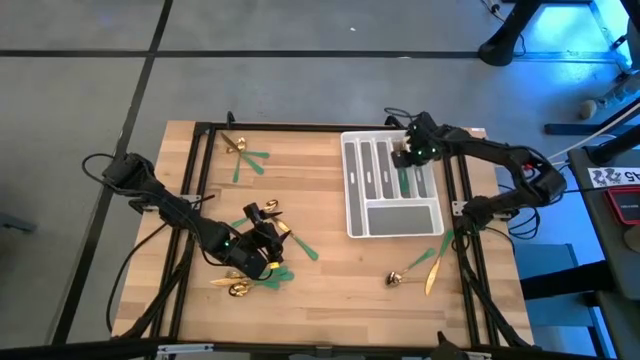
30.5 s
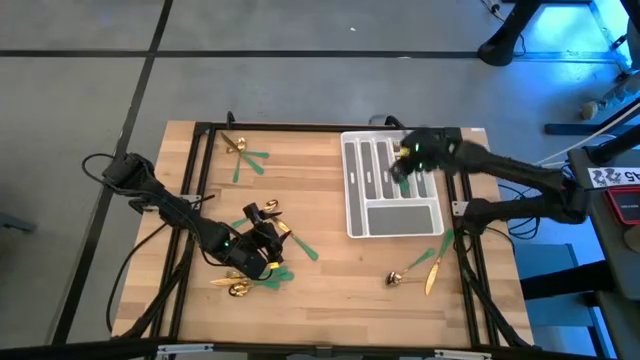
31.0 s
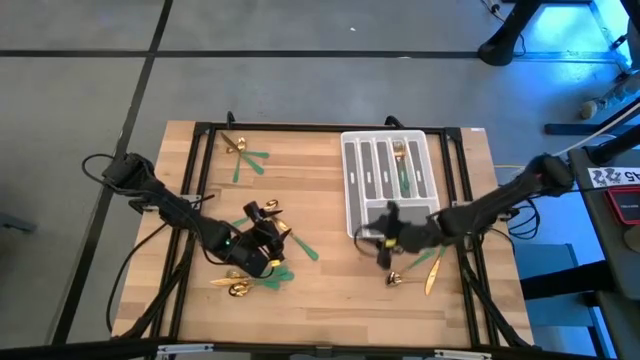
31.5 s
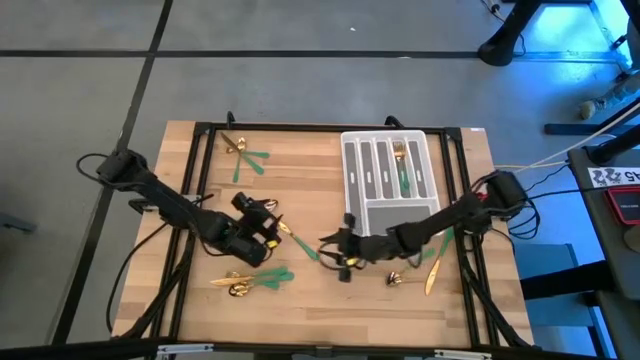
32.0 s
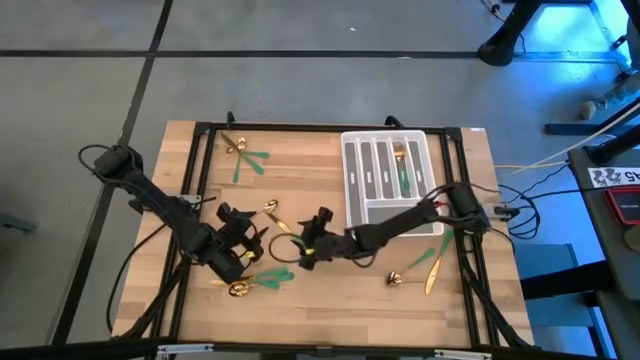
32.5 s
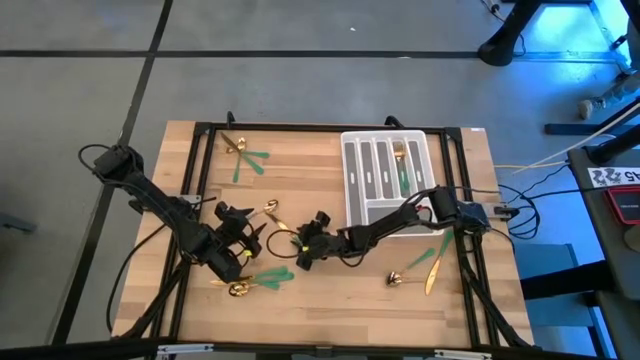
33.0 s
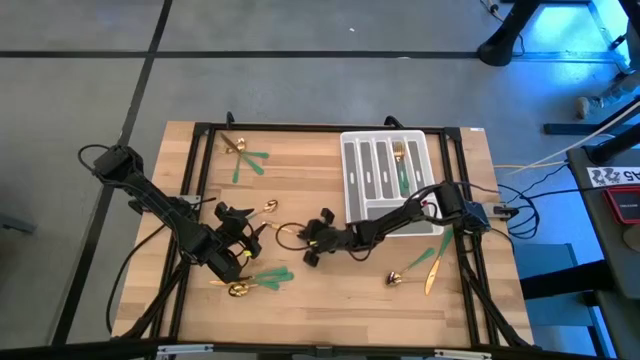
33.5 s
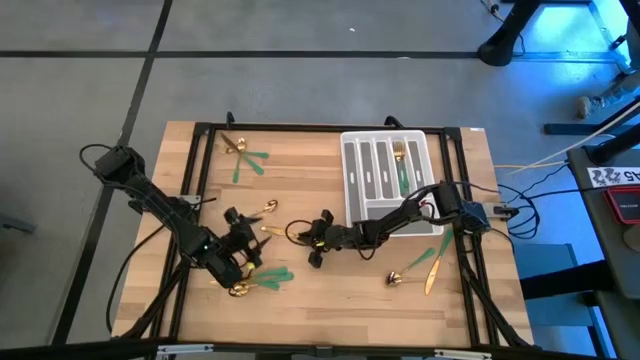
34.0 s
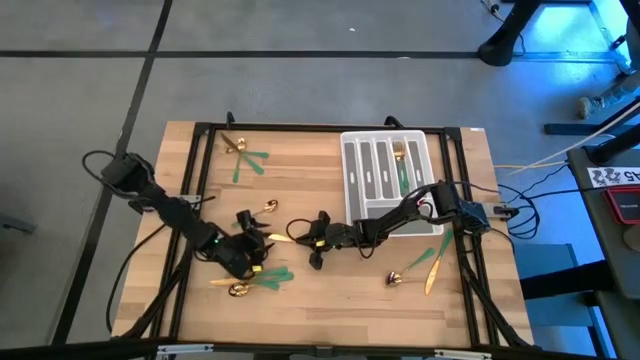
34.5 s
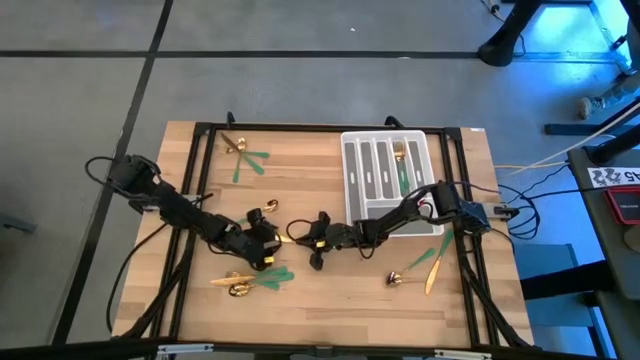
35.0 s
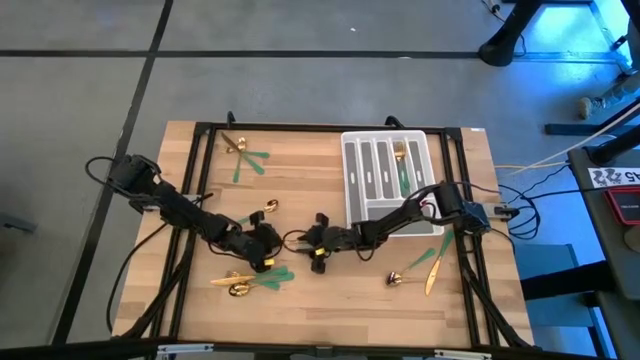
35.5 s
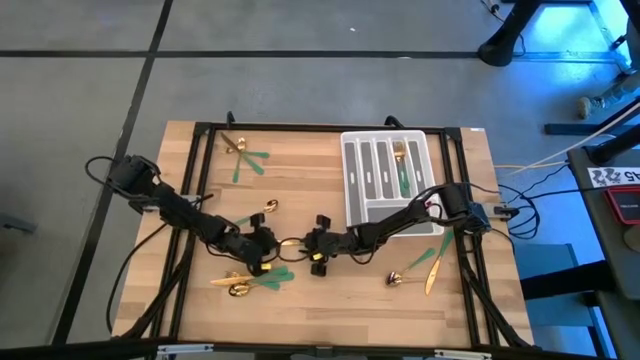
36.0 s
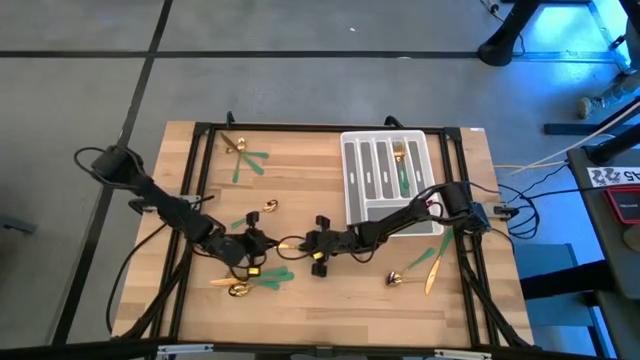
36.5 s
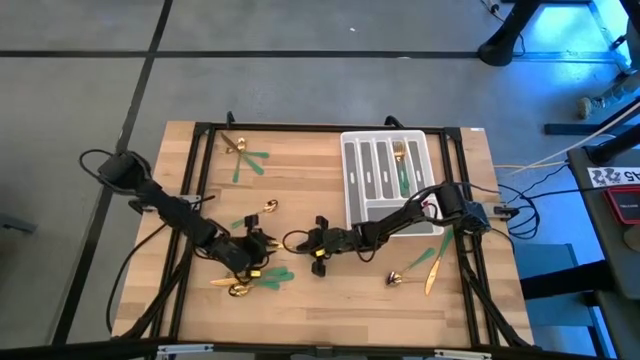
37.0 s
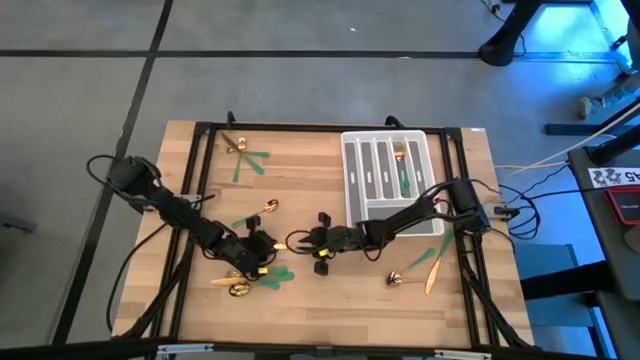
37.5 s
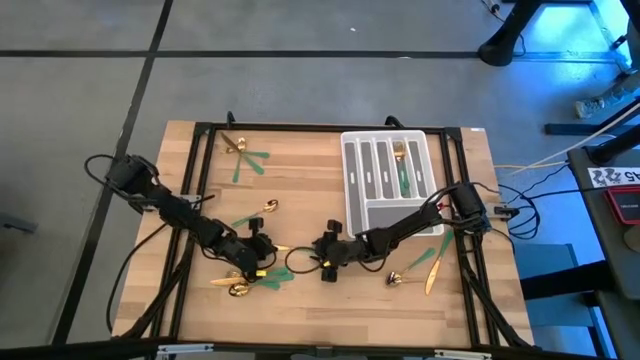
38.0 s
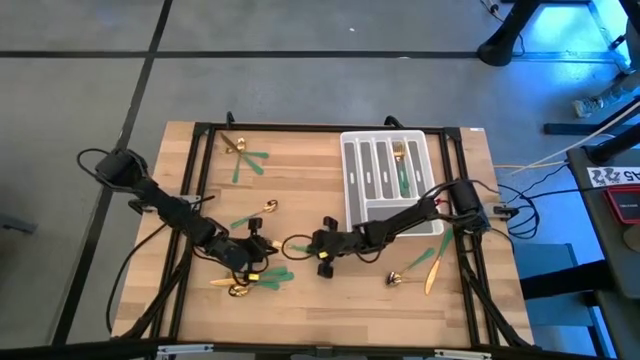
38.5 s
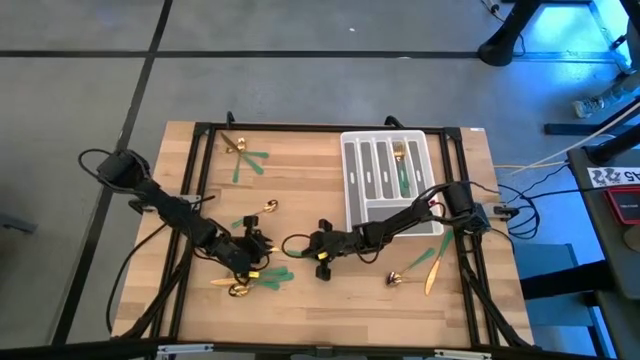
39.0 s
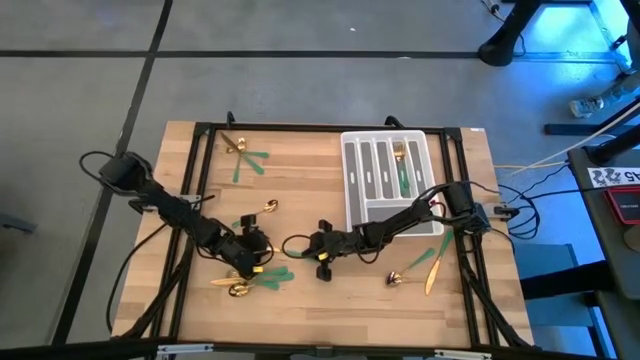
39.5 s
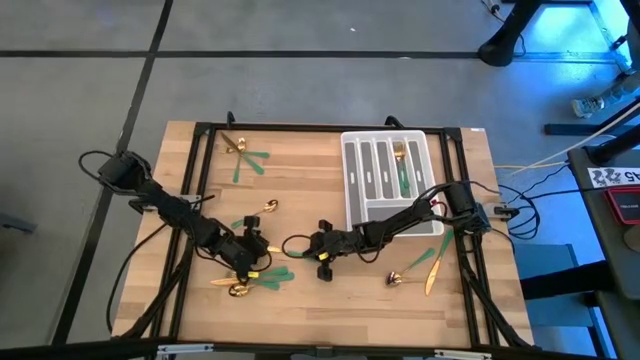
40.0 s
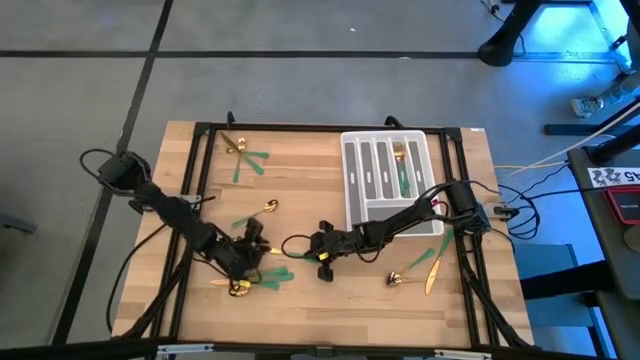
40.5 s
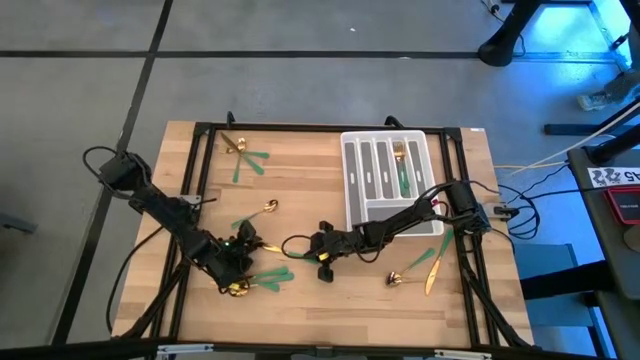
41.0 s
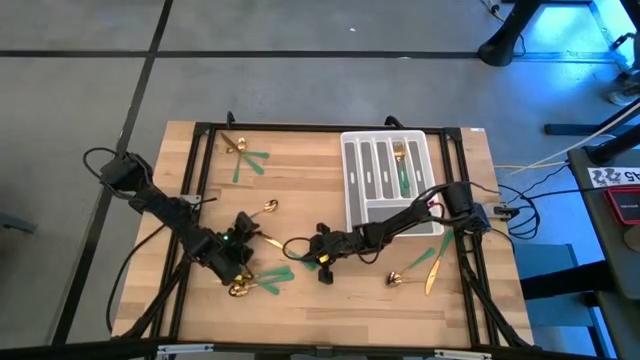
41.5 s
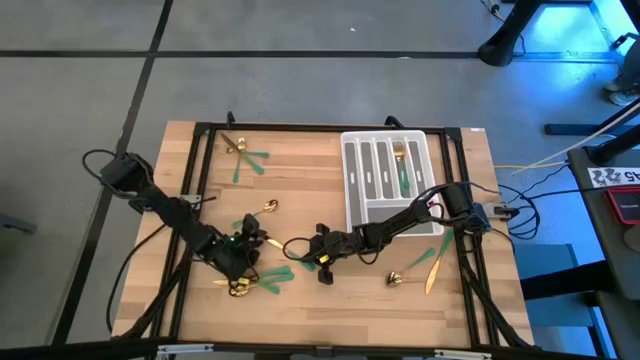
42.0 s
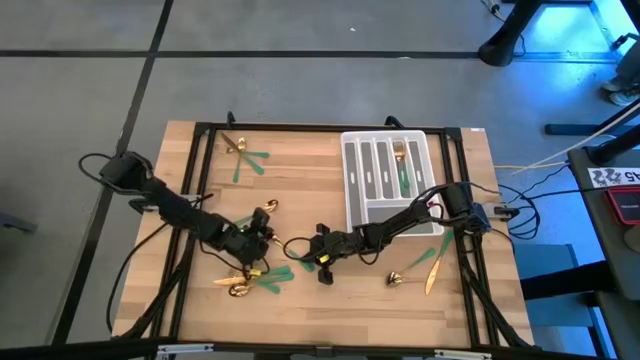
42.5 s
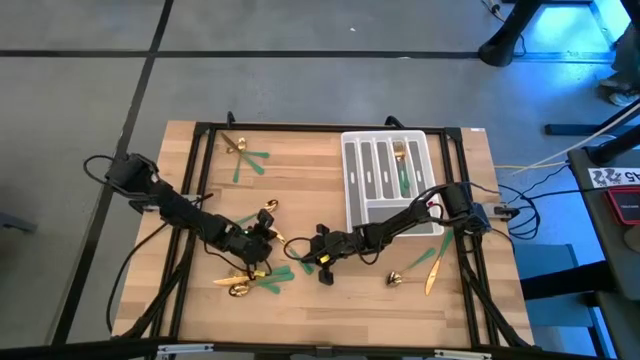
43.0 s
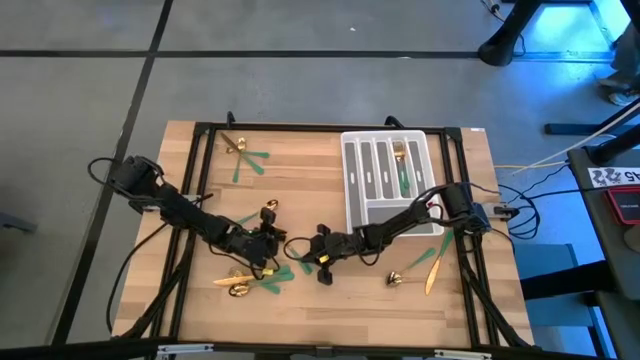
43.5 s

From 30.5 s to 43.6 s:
Task: Sort silverware
Put the green knife into the silverware tray

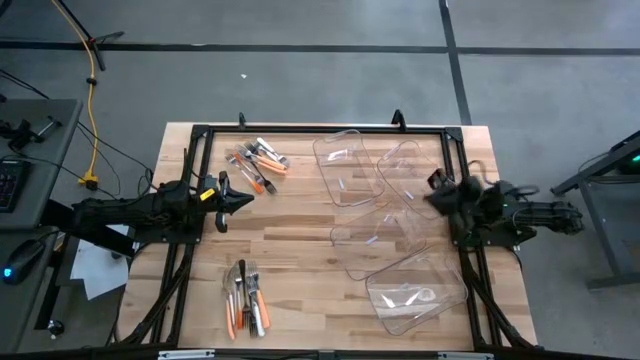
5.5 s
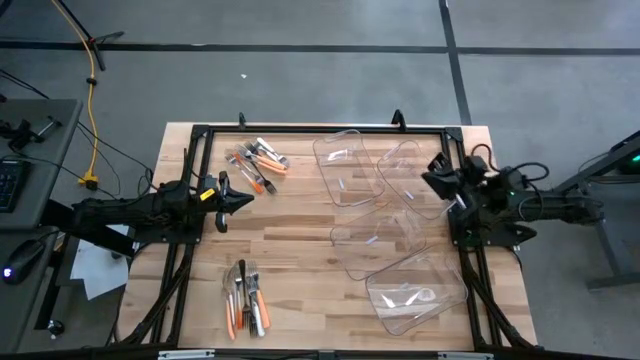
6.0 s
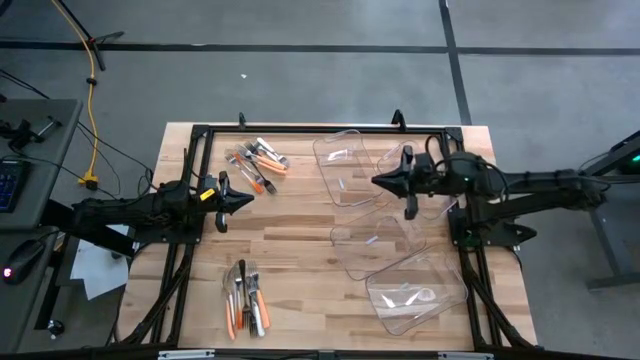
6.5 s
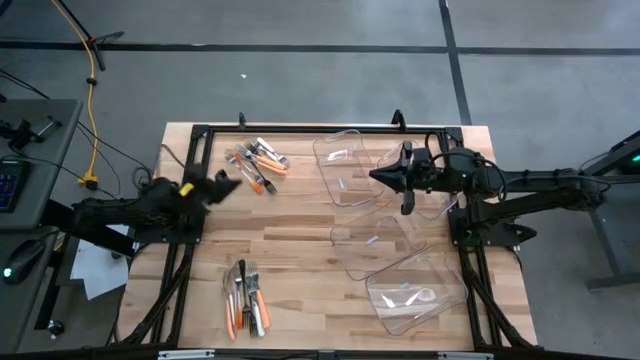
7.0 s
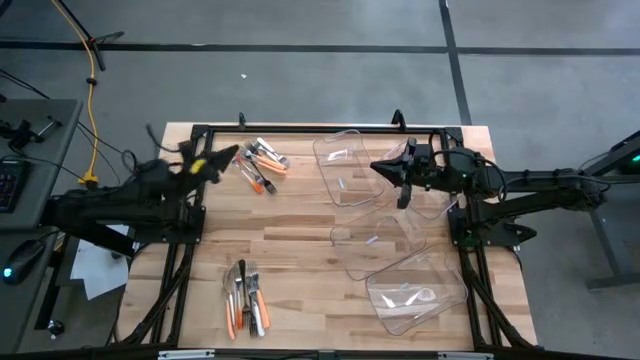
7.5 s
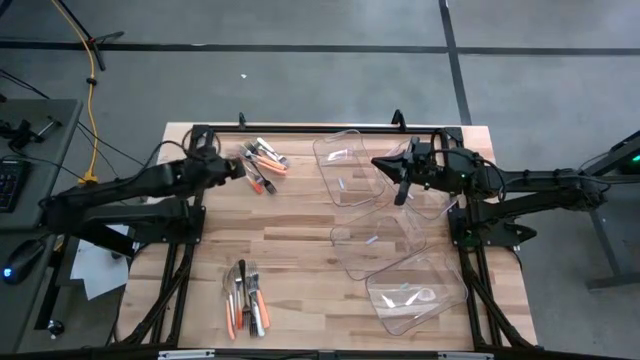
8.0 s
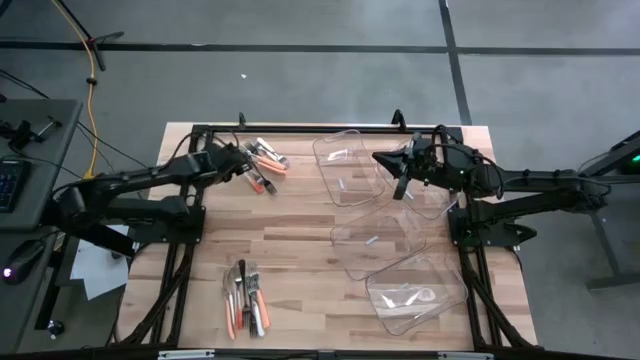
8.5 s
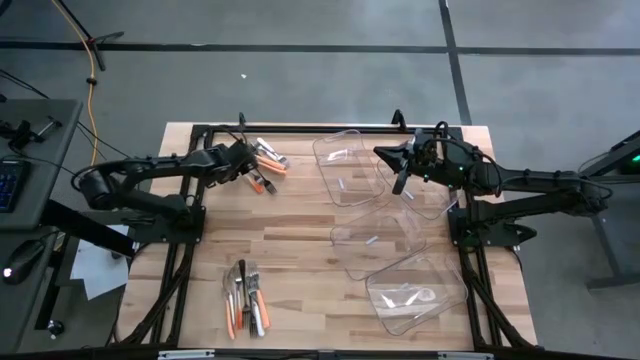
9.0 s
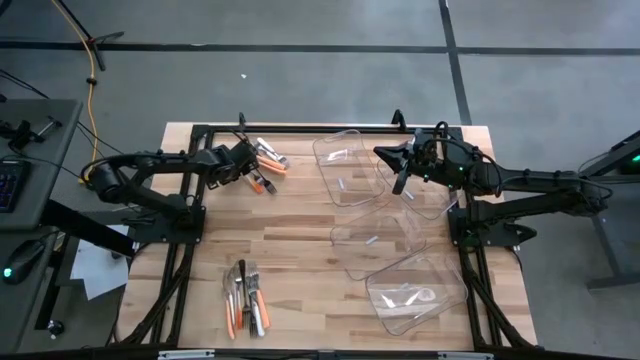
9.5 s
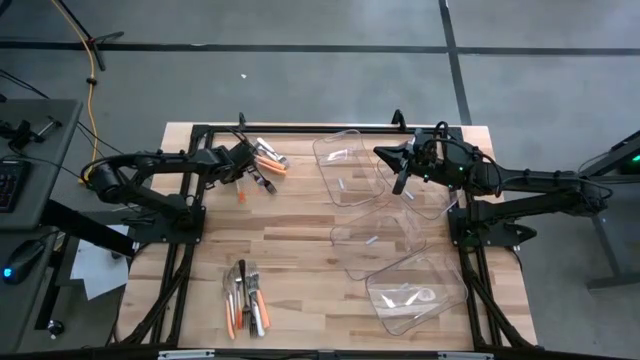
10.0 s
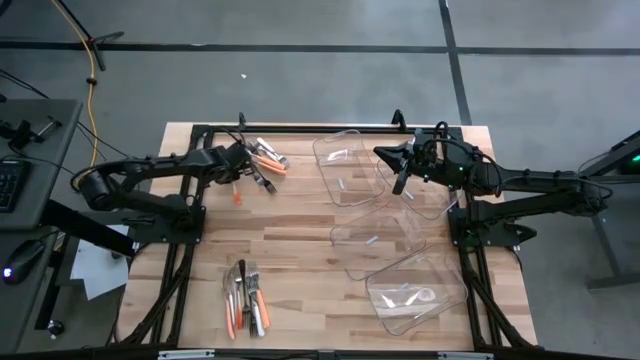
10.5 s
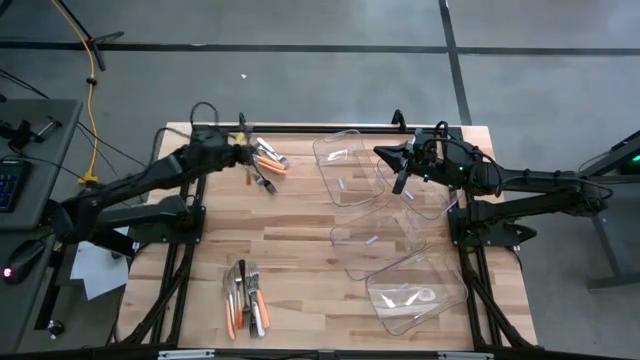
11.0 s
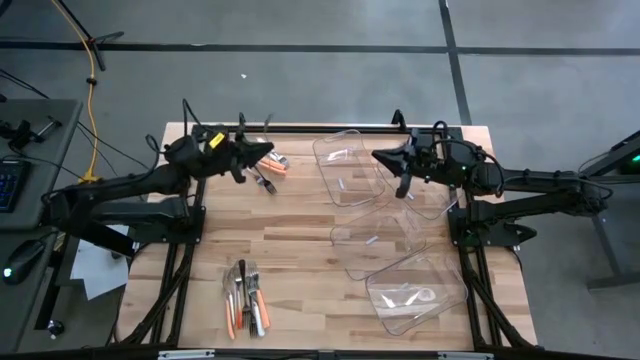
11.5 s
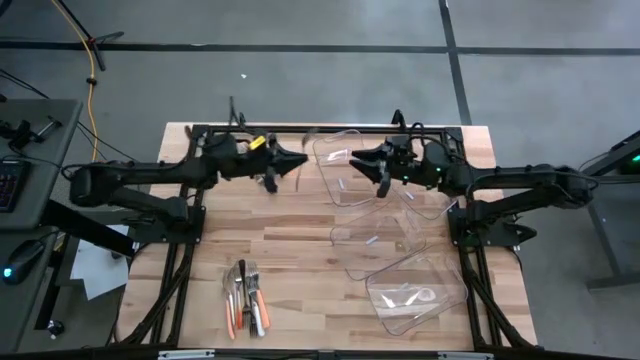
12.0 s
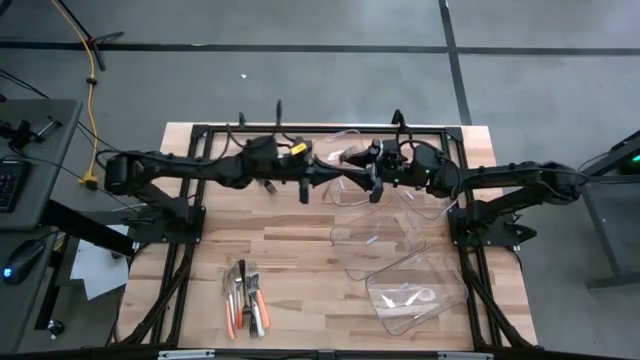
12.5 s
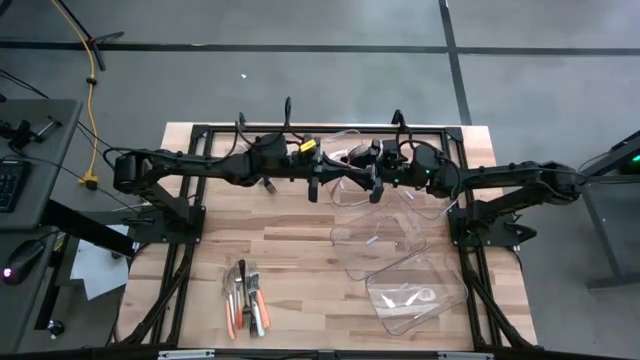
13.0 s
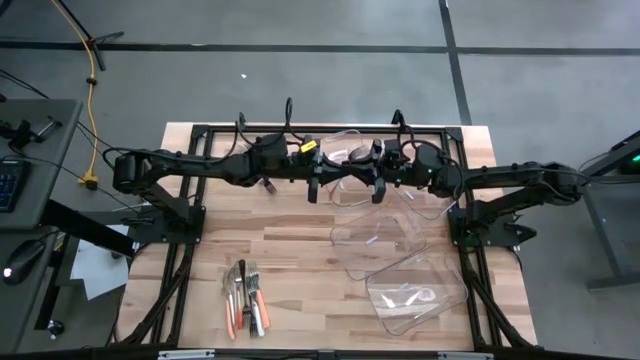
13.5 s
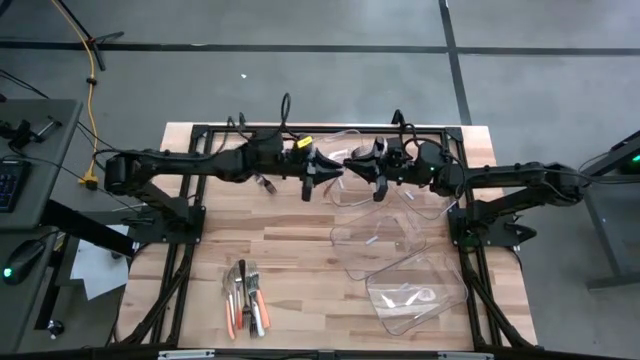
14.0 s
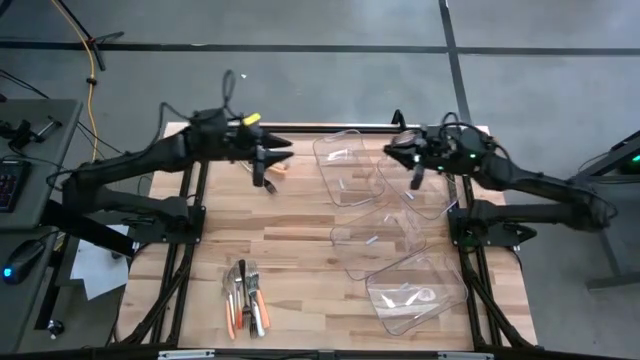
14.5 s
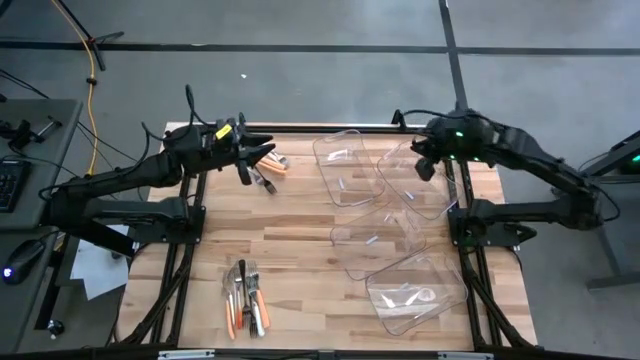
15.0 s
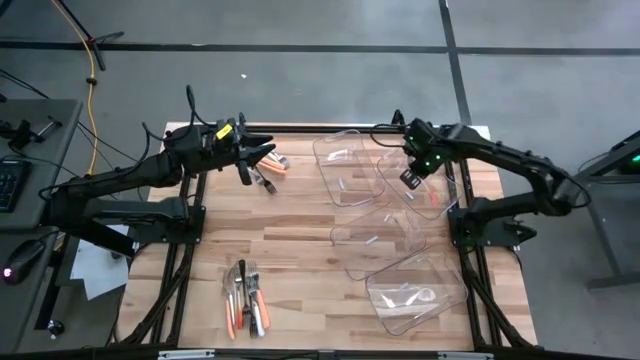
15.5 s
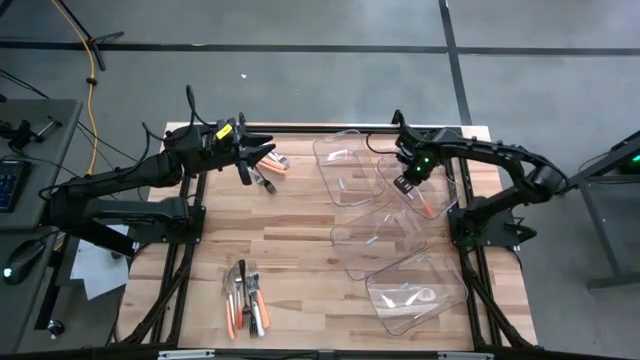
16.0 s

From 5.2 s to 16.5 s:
Task: Sort silverware by color (type)
Put the orange fork into the top right transparent bin
